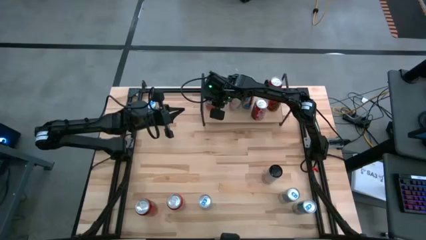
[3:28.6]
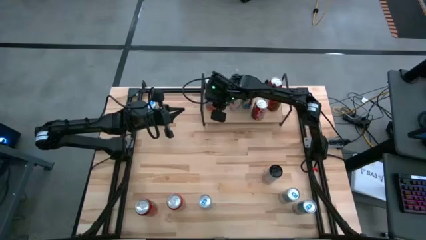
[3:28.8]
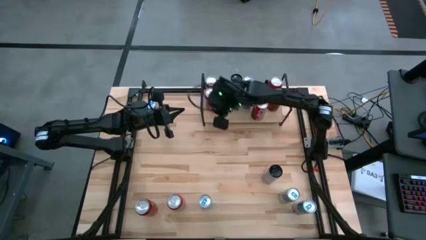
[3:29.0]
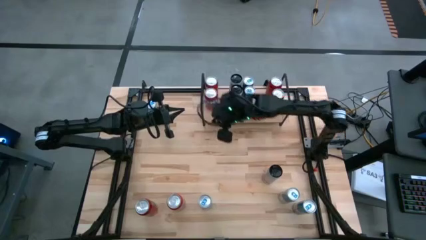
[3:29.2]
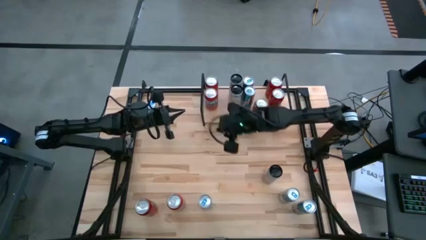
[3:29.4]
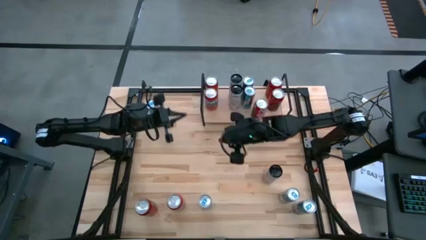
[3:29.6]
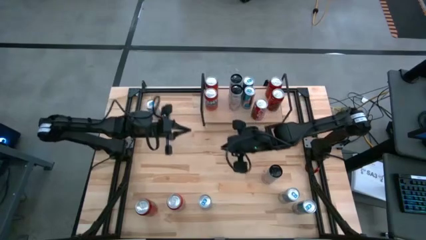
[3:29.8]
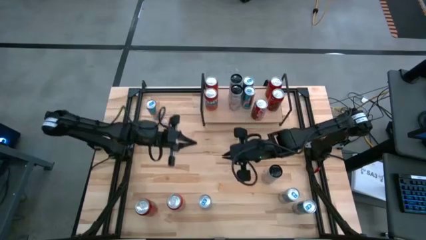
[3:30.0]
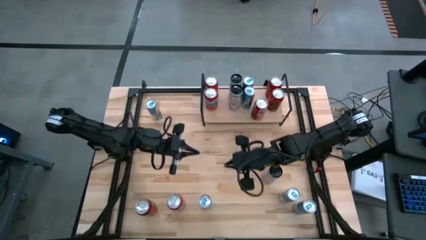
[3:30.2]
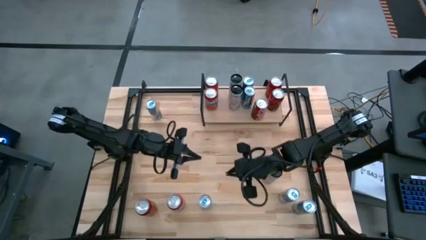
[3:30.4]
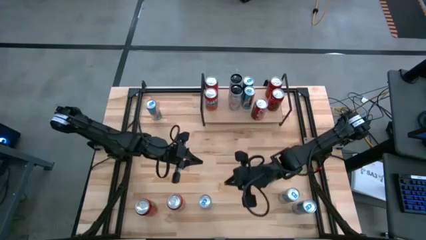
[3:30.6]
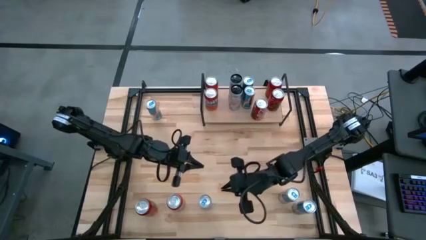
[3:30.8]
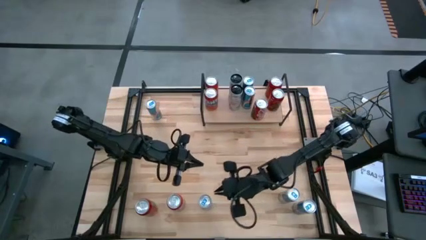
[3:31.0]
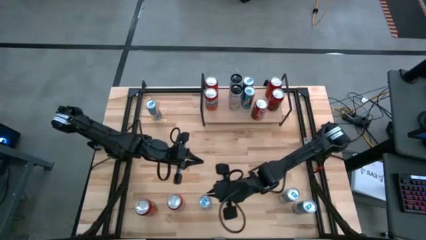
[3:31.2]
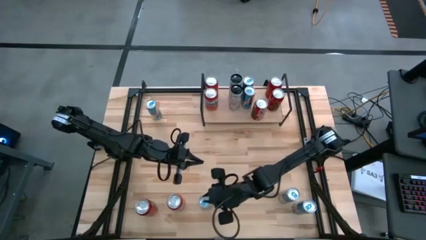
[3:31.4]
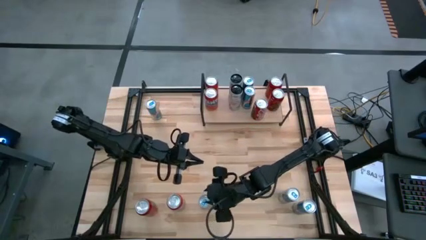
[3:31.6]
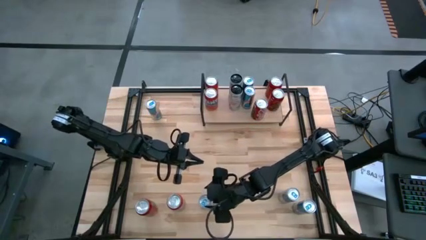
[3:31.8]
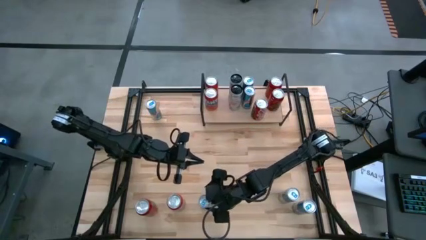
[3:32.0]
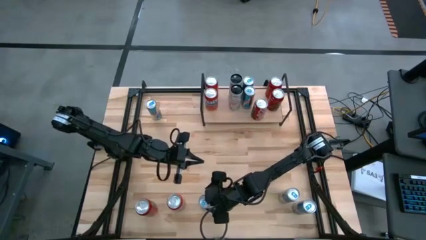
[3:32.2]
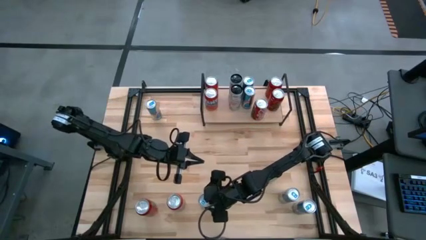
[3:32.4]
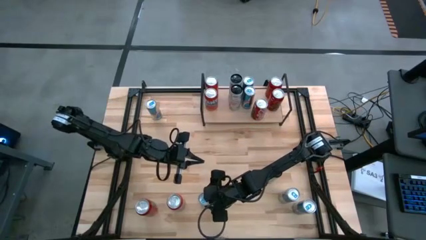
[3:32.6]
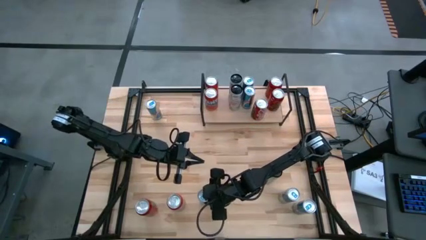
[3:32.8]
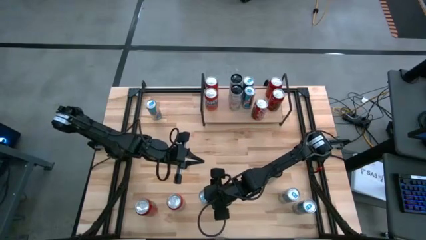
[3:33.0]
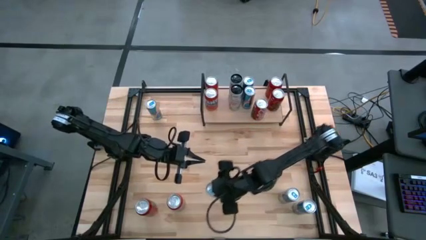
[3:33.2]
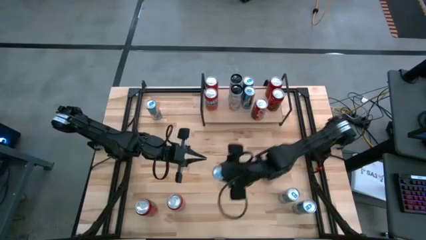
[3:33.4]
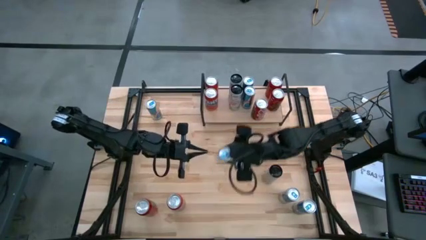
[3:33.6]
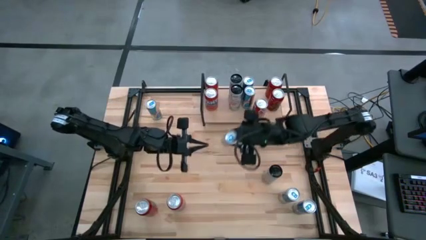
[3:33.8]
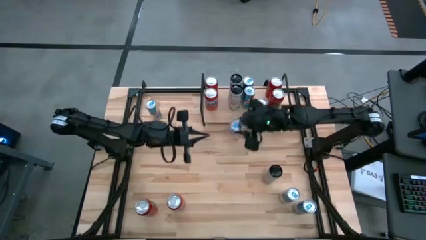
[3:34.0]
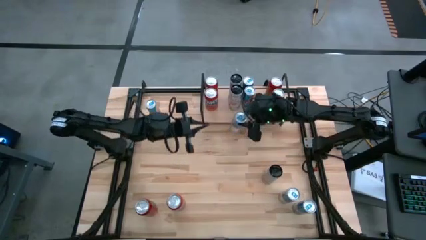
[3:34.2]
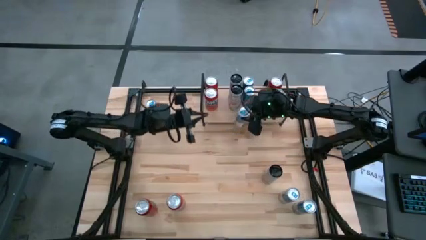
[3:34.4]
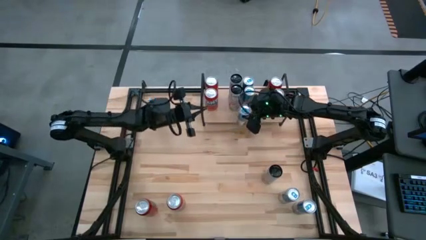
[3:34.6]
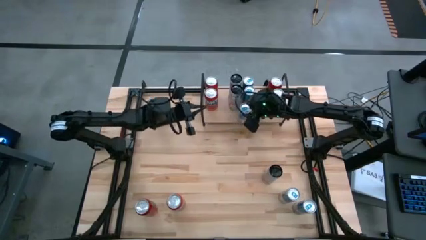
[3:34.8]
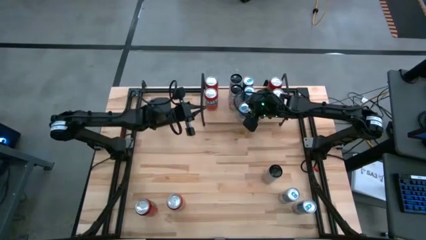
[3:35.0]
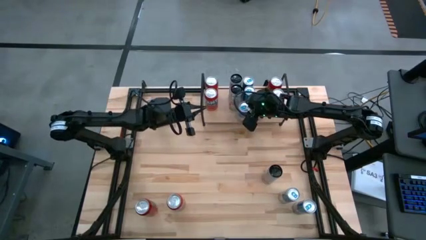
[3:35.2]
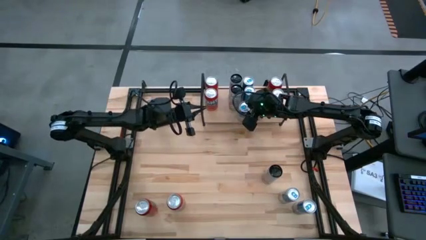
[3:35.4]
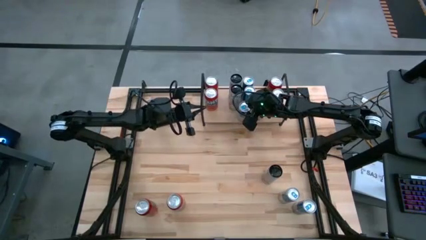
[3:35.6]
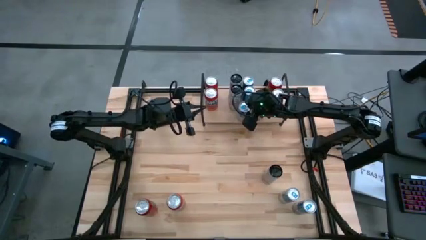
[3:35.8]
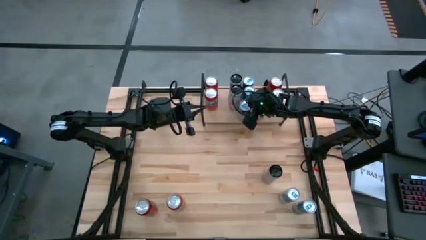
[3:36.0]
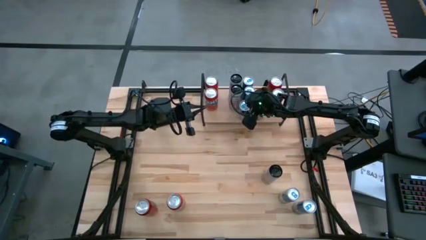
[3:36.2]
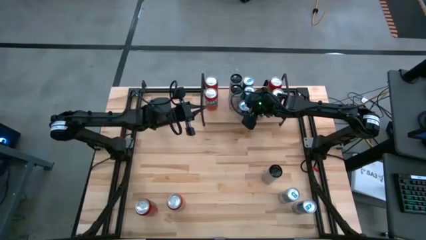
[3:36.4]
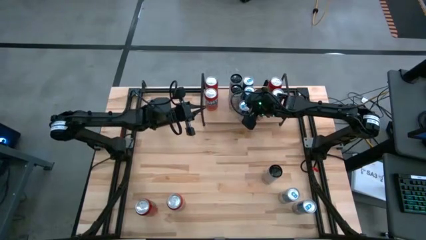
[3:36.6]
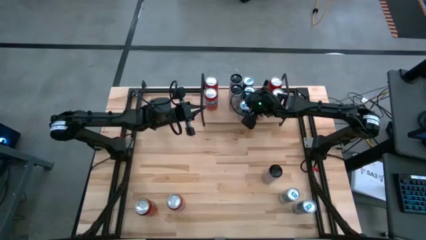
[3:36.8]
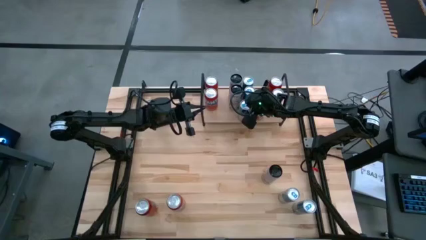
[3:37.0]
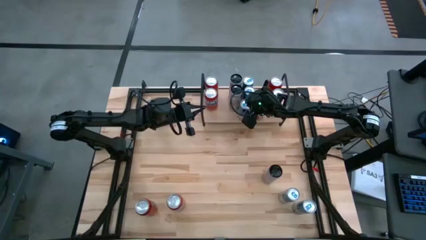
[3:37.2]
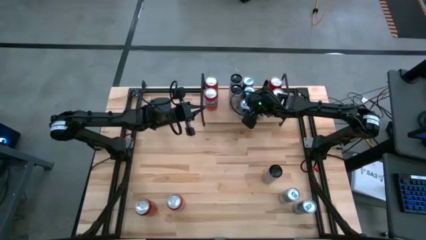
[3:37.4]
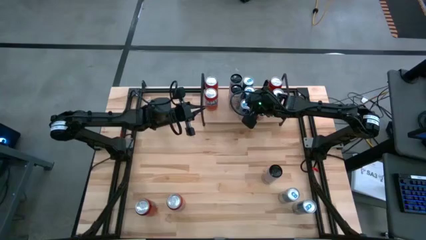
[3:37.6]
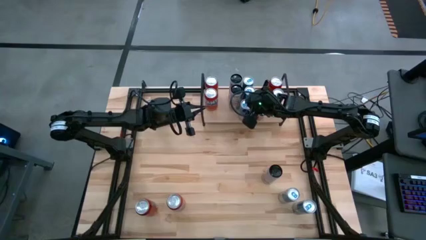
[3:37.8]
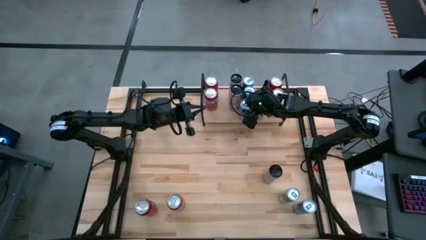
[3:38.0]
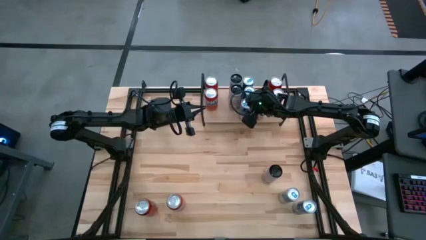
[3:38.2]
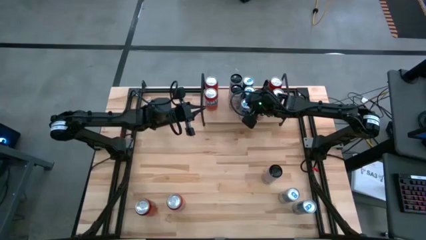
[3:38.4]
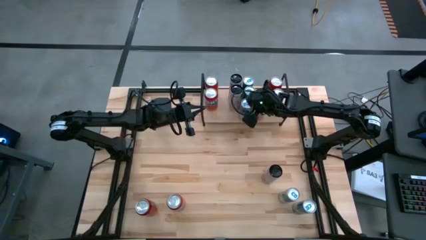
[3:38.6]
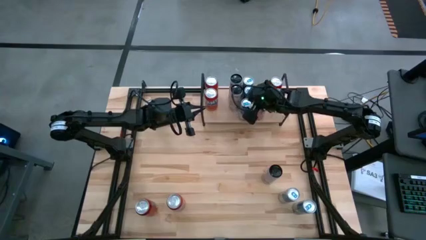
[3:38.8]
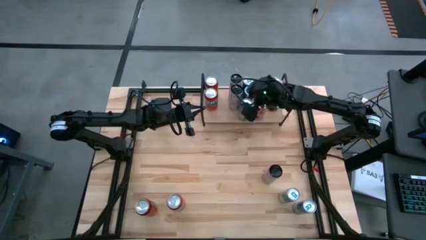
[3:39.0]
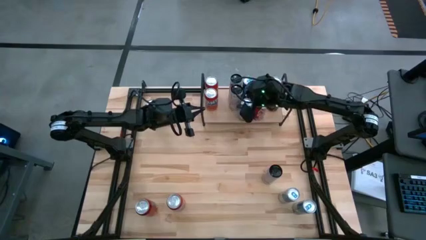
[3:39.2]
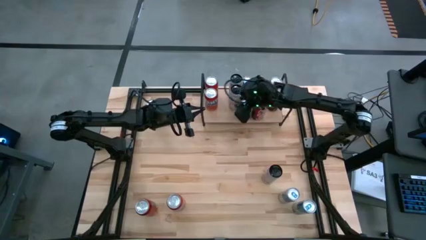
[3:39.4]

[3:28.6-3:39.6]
Task: Place canned beverage on shelf
Put the blue soda can on the shelf

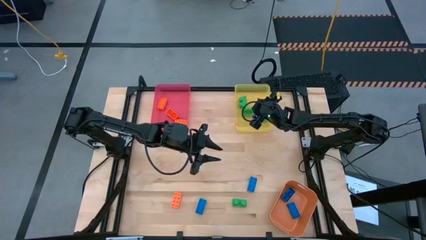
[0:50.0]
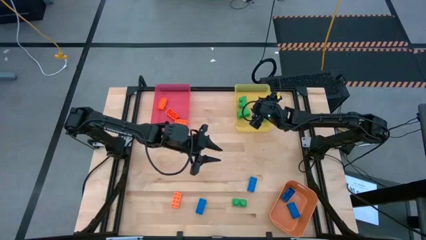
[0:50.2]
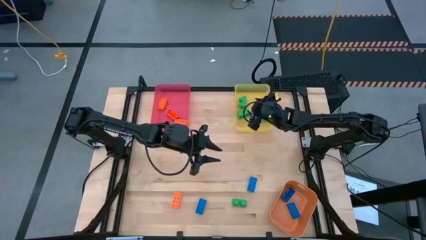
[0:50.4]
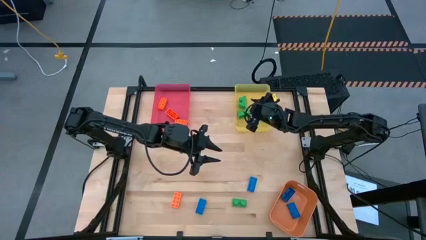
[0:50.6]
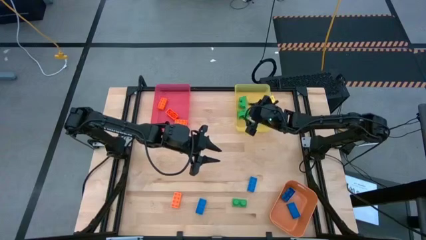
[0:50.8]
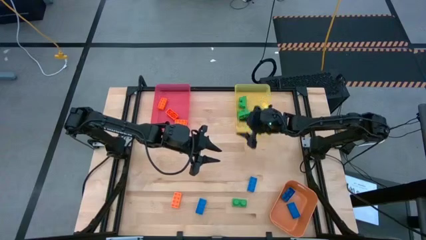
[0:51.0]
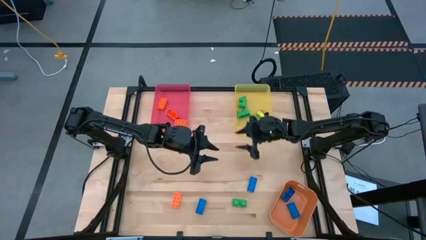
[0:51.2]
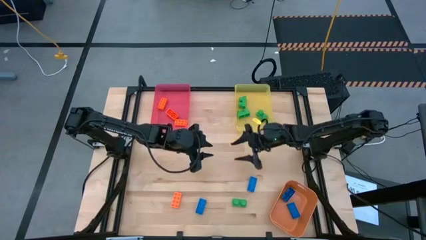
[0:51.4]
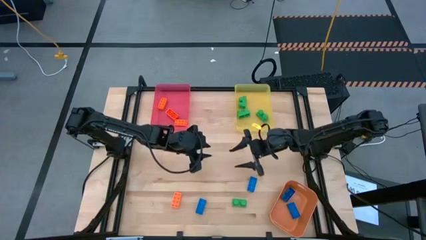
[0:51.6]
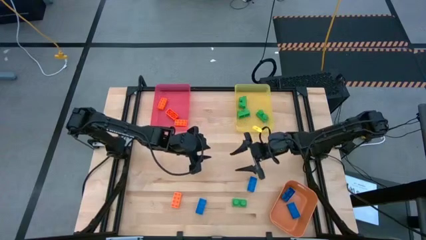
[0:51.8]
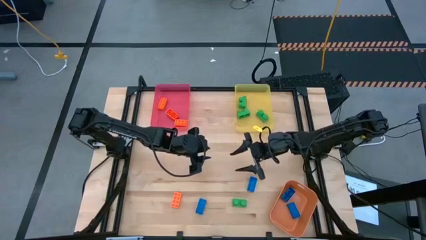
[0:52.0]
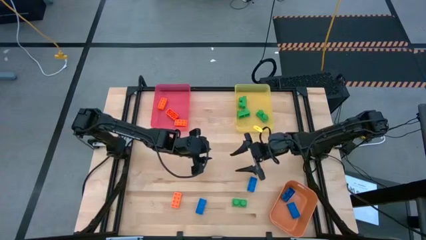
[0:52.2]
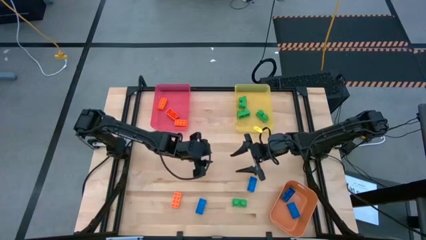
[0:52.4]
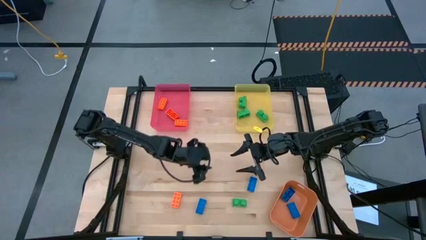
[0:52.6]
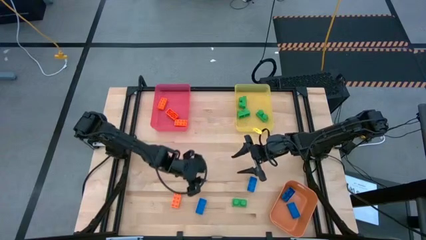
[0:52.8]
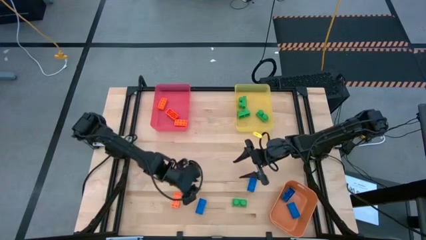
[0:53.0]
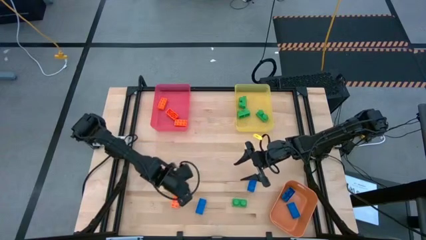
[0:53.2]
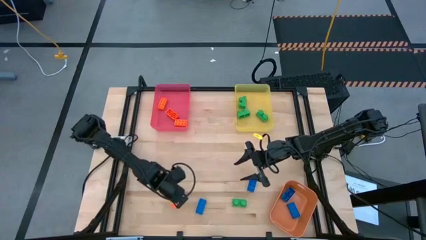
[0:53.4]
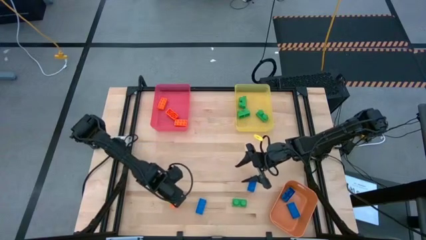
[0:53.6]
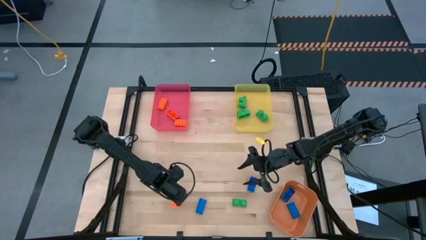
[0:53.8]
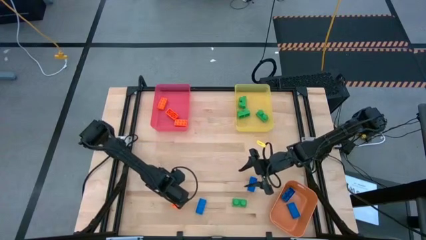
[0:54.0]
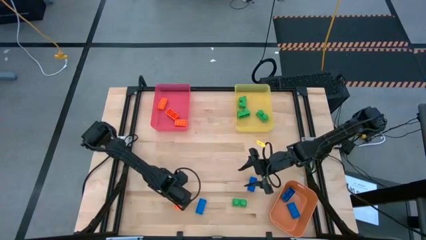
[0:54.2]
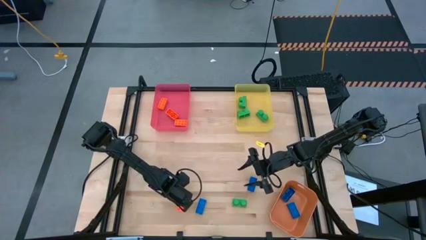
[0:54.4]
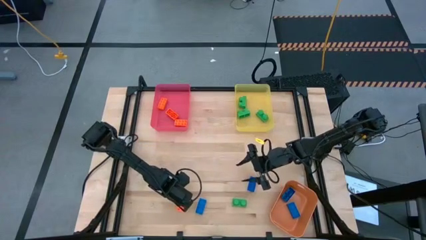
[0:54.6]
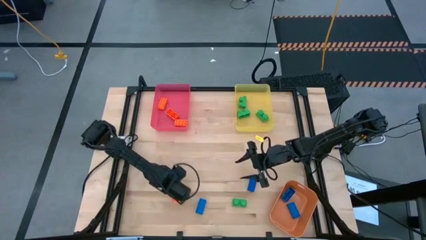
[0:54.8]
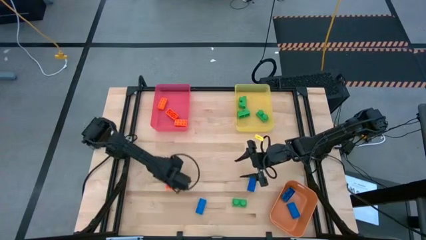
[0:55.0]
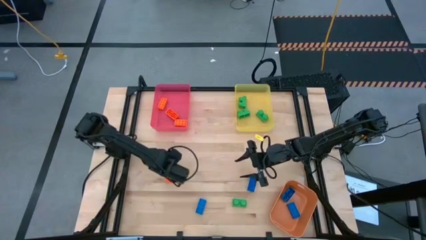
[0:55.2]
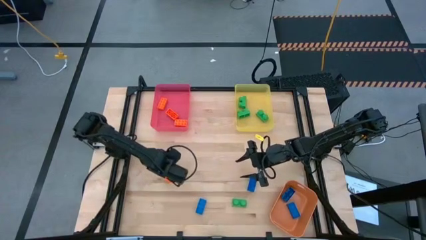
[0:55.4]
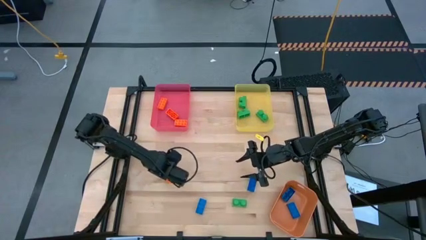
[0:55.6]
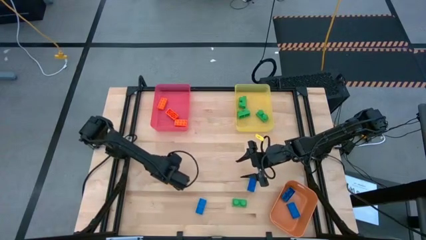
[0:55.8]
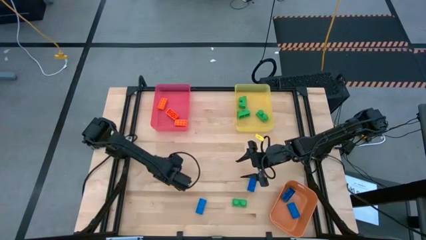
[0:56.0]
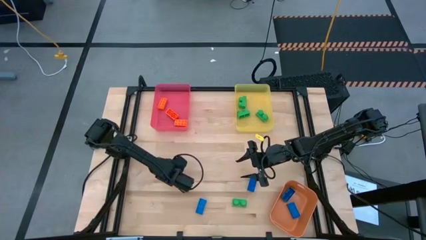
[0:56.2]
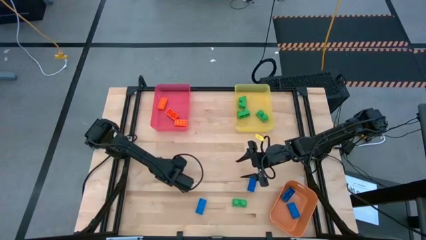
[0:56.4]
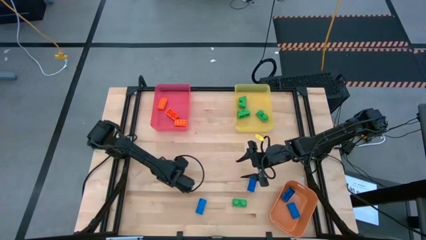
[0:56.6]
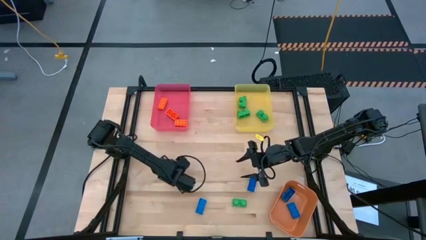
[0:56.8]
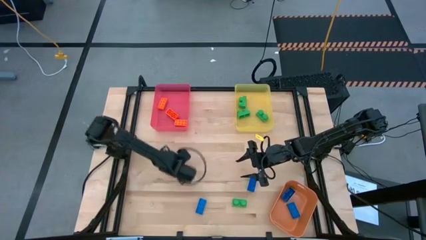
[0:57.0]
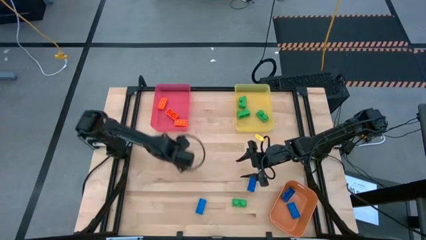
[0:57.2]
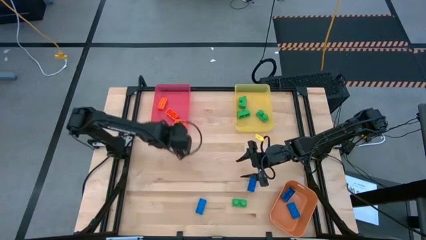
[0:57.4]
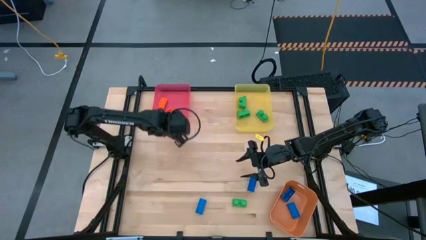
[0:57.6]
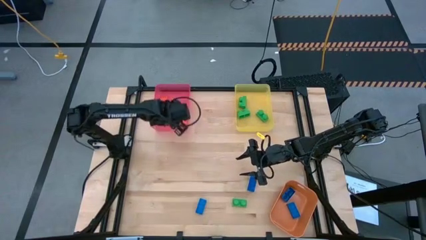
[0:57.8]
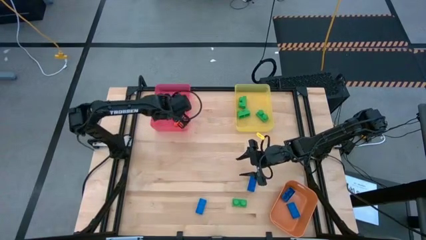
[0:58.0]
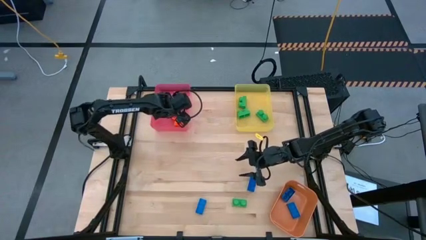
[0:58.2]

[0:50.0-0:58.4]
Task: Sort & place blocks by color
Put the orange game piece into the red bin
